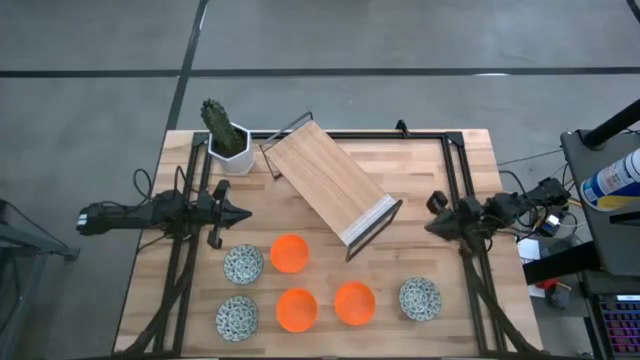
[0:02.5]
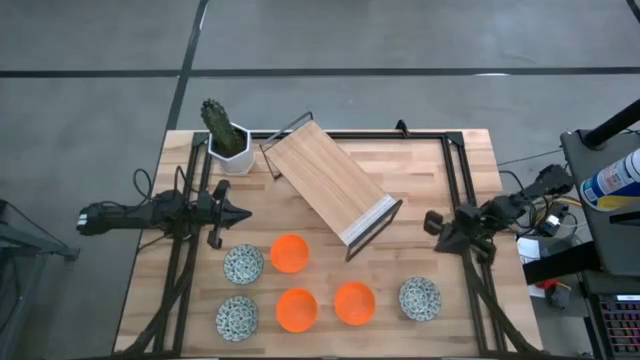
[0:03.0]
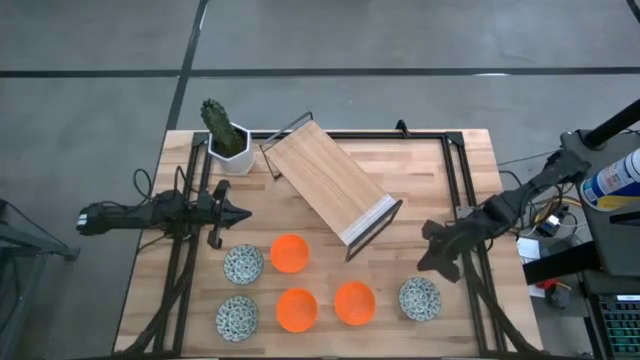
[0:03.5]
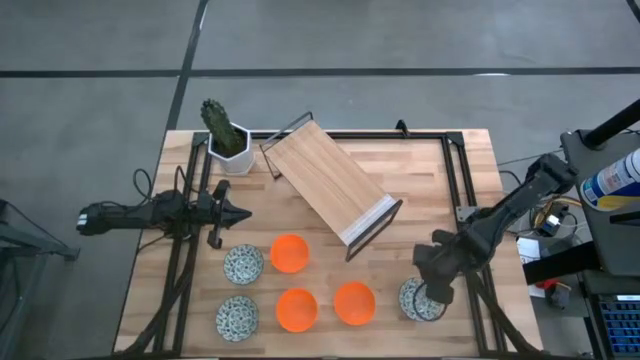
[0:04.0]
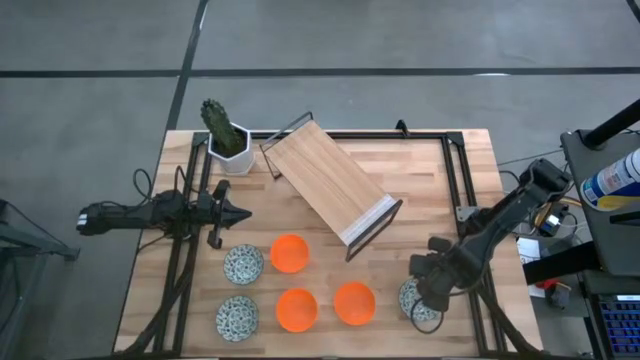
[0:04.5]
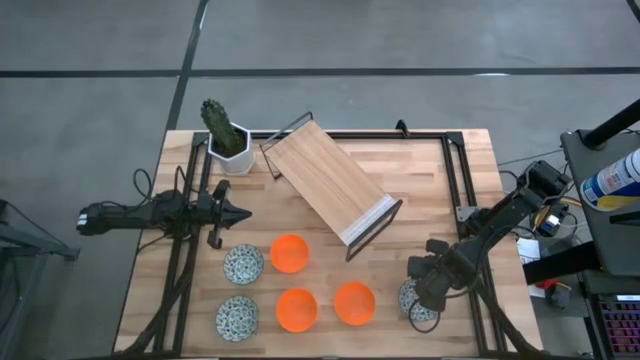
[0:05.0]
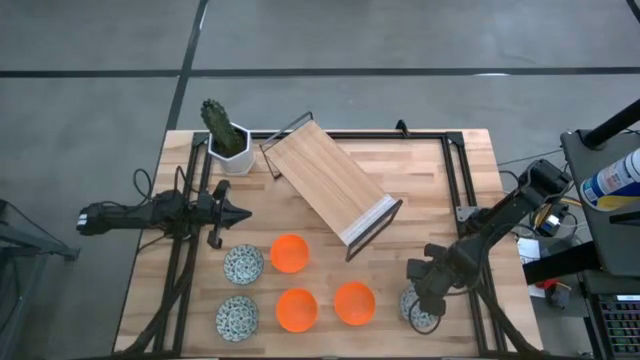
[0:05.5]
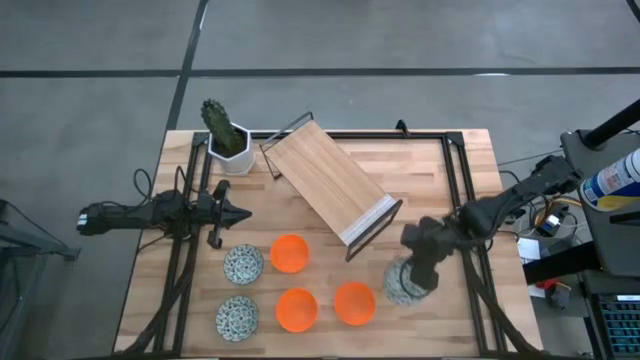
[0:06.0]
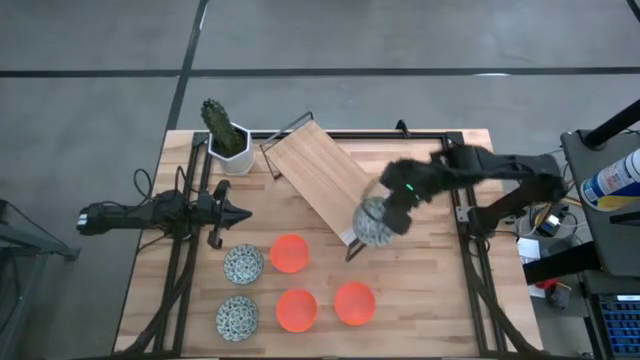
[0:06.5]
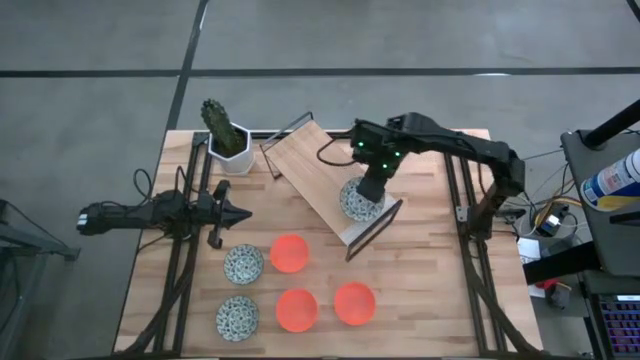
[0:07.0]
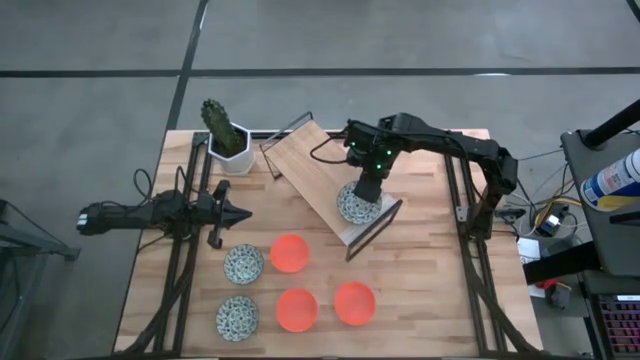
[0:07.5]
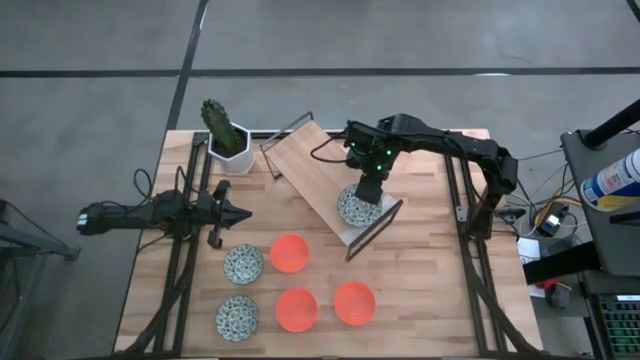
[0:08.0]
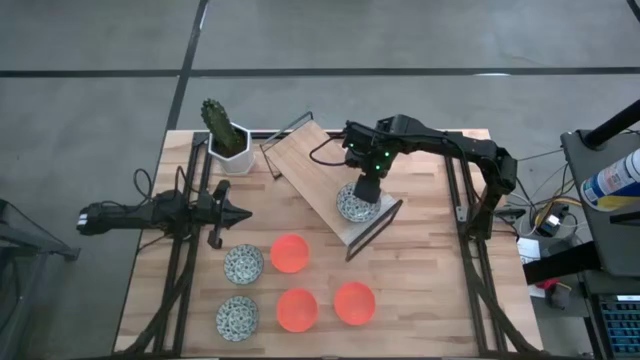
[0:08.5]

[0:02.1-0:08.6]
Task: Pick & Place Mini bowls
Put the bottom right white patterned bowl on the shelf

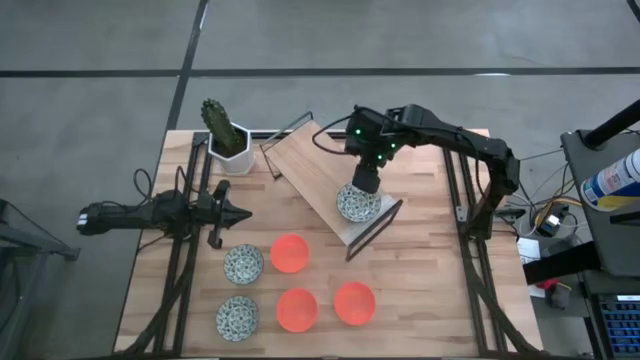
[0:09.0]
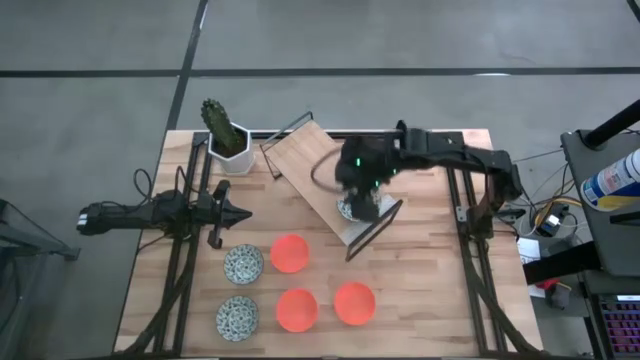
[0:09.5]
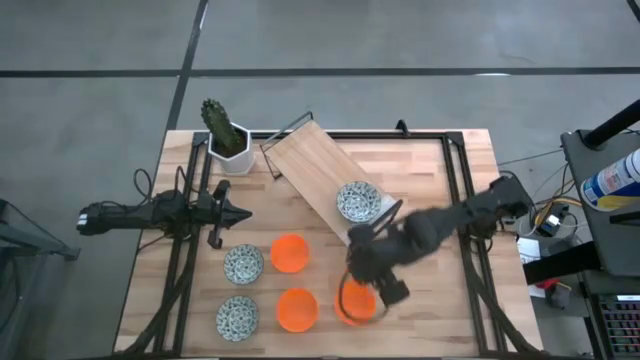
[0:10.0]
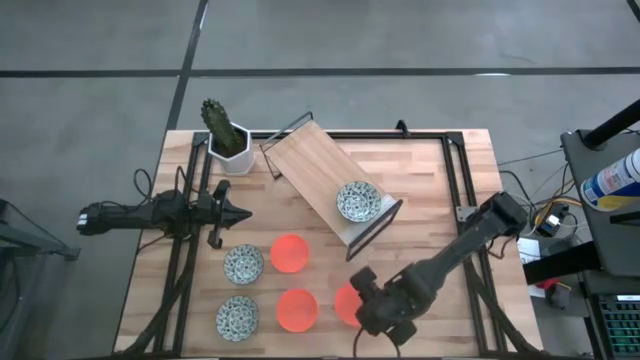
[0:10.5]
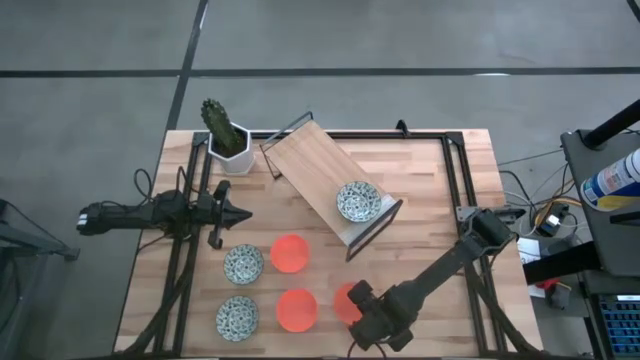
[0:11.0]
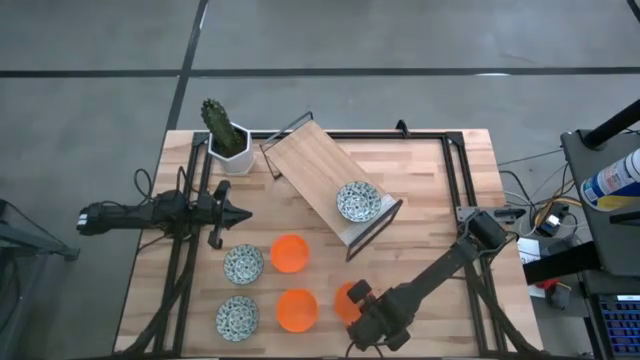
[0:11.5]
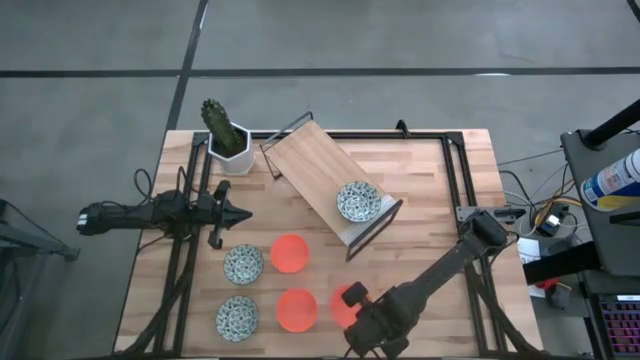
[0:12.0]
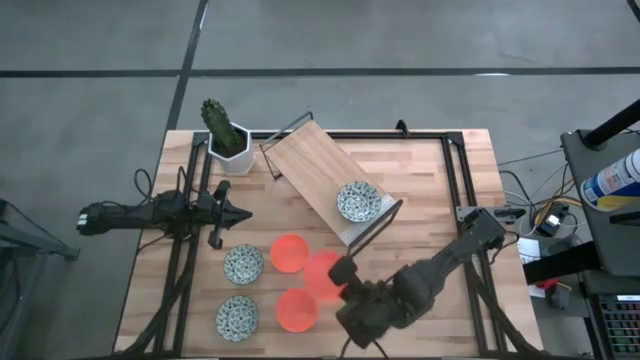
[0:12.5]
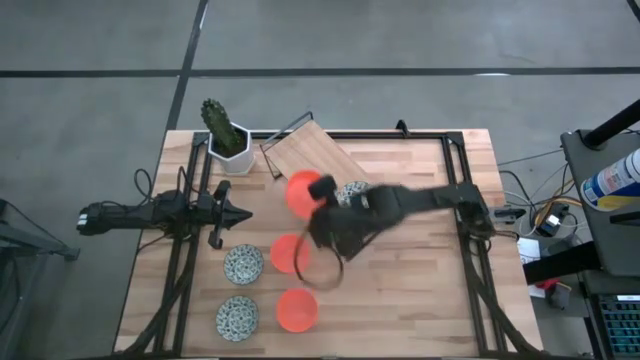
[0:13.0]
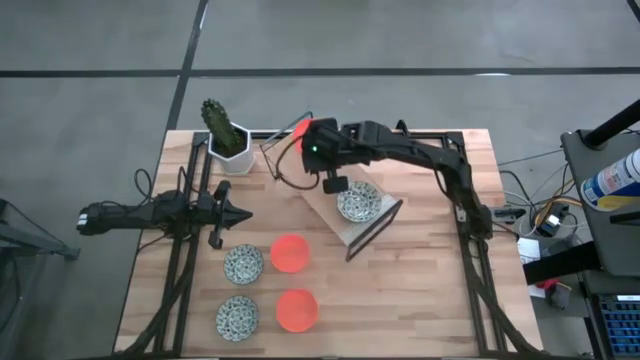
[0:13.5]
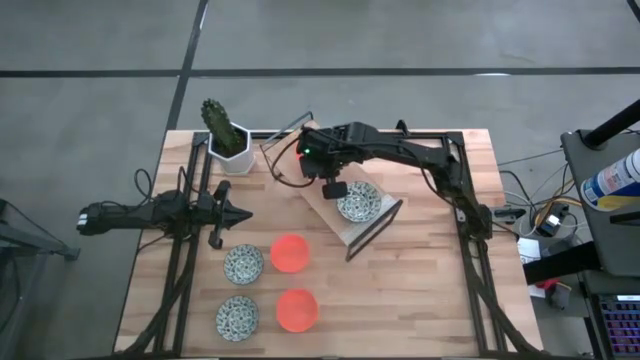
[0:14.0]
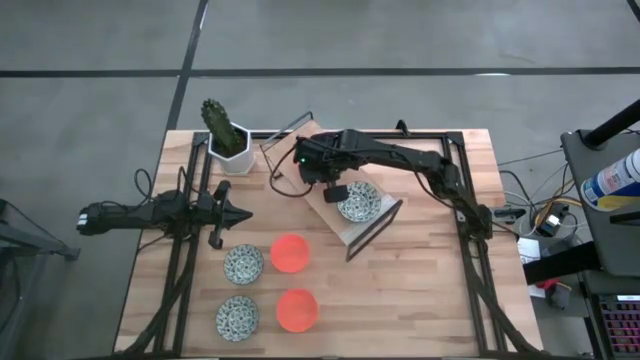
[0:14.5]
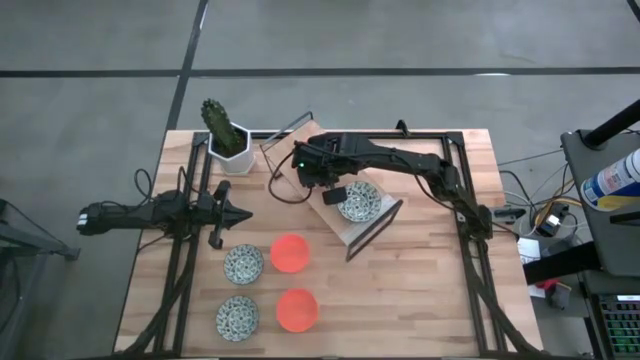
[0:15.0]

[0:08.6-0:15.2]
Put the bottom right orange bowl on the shelf

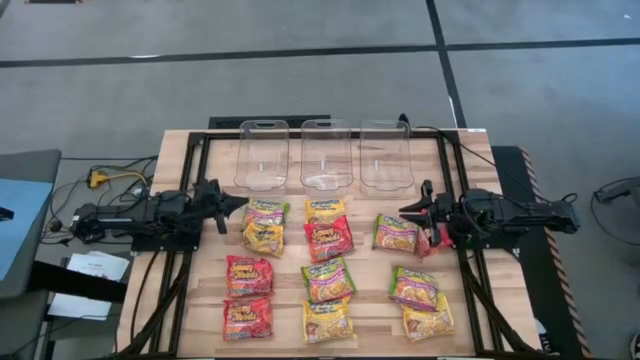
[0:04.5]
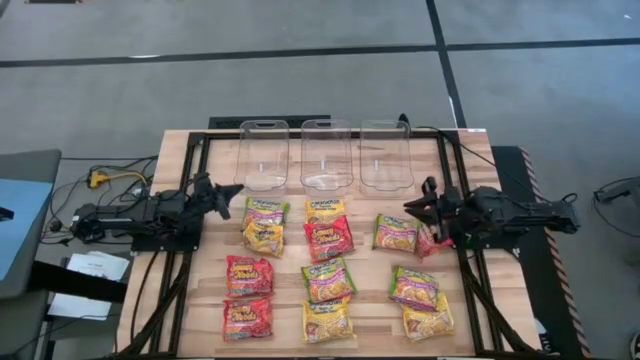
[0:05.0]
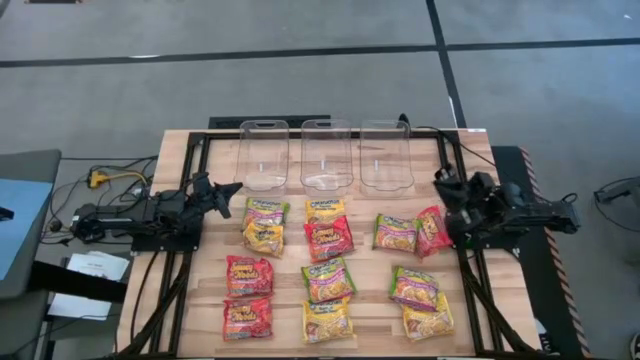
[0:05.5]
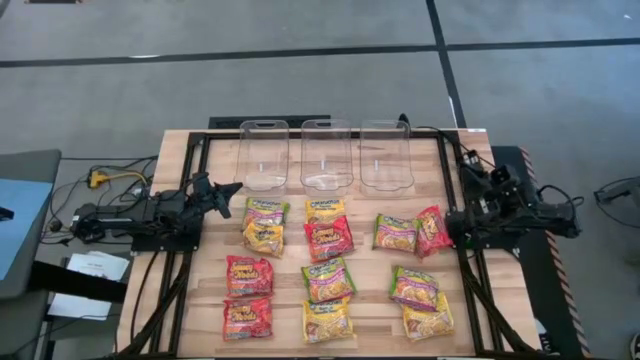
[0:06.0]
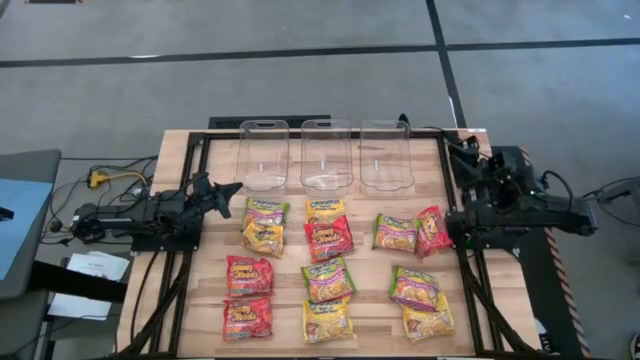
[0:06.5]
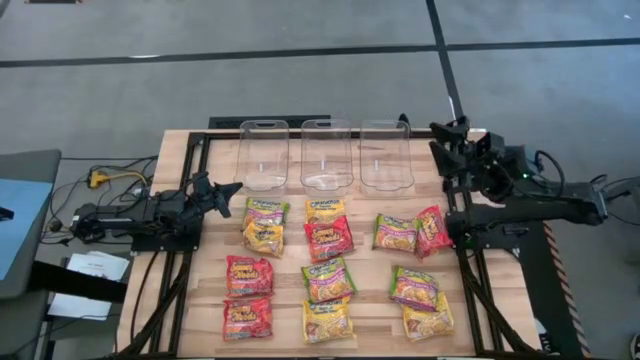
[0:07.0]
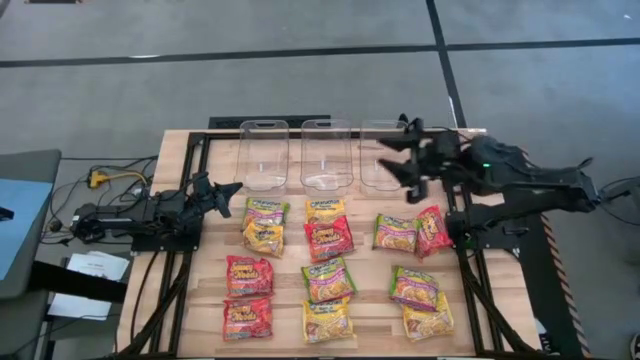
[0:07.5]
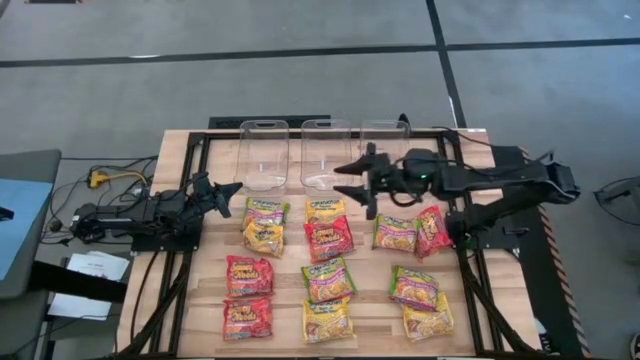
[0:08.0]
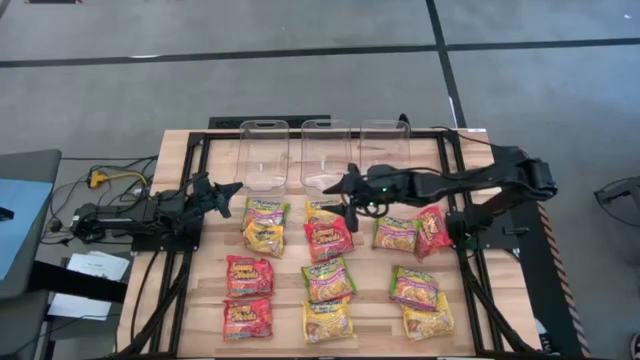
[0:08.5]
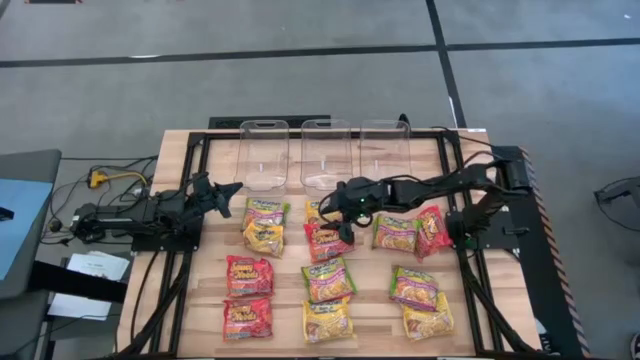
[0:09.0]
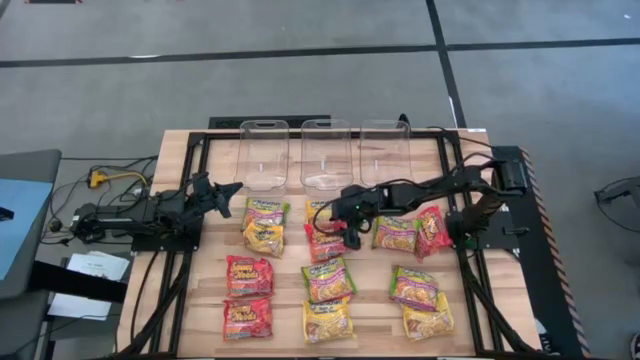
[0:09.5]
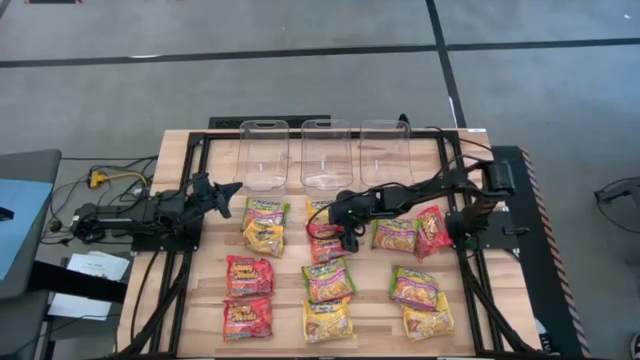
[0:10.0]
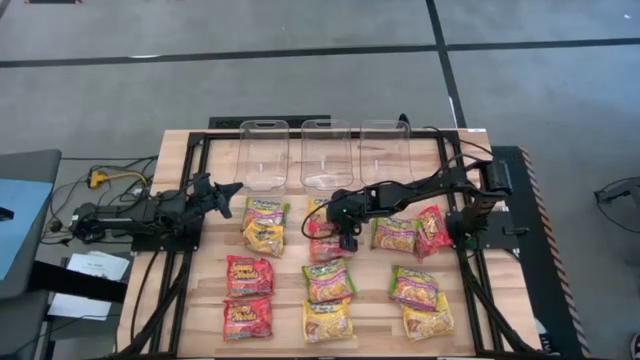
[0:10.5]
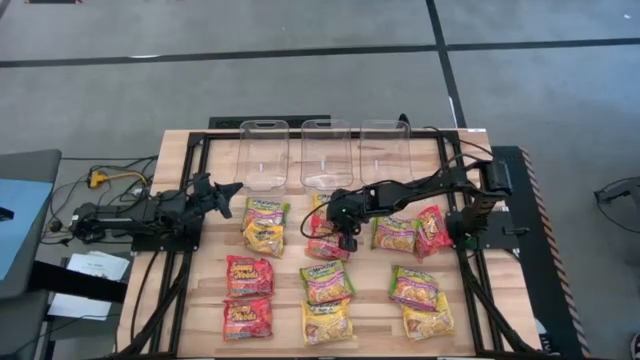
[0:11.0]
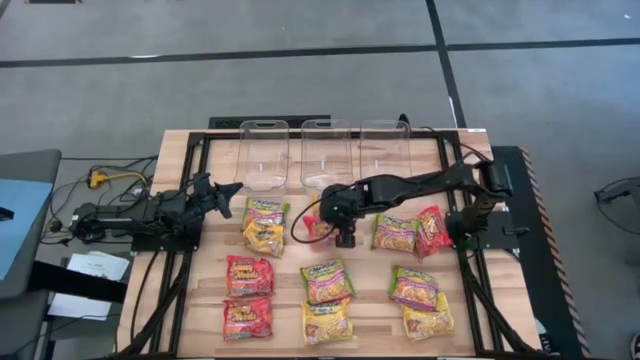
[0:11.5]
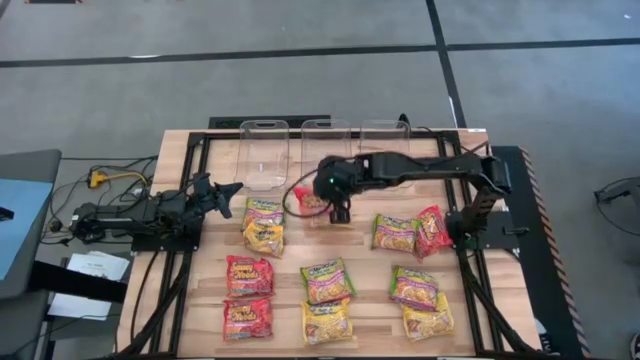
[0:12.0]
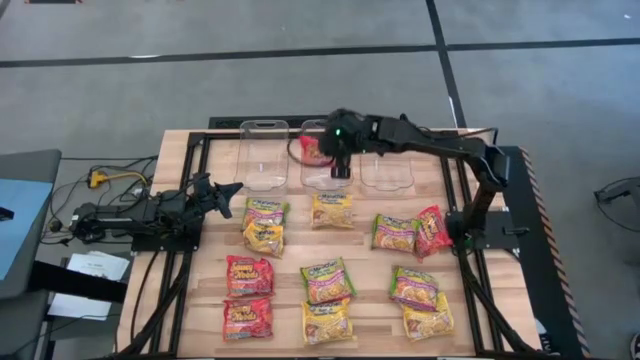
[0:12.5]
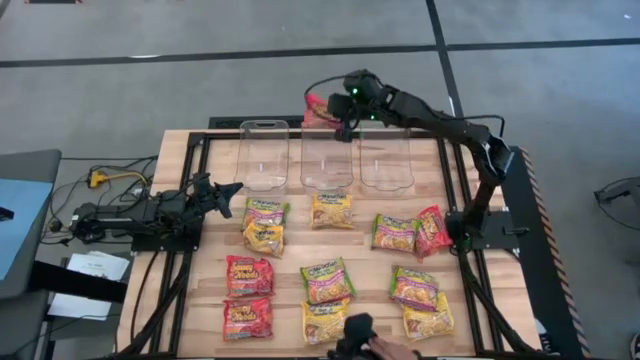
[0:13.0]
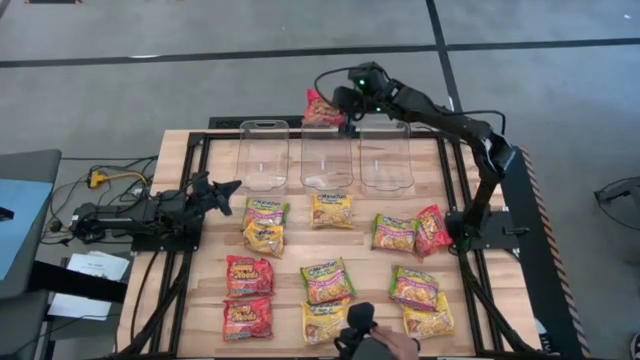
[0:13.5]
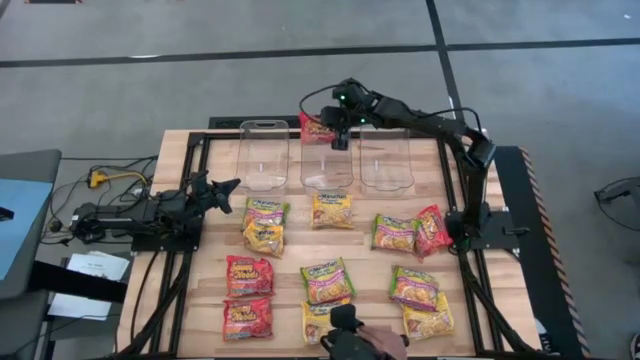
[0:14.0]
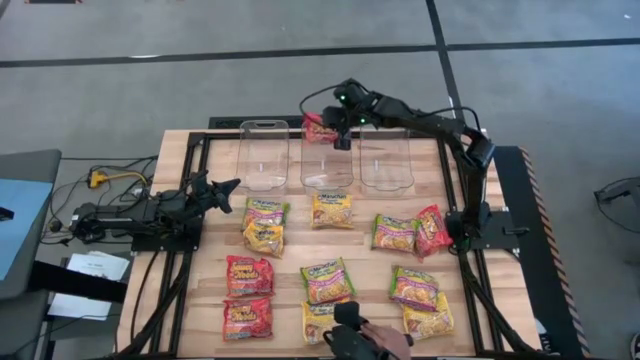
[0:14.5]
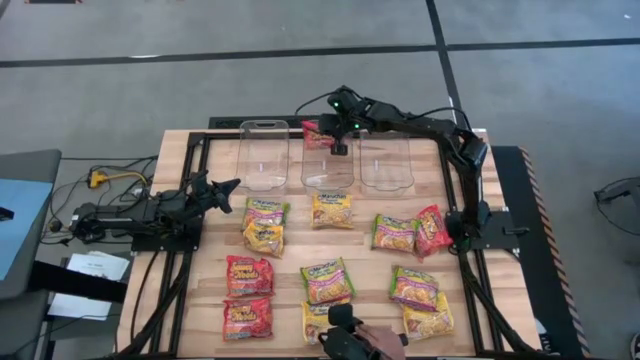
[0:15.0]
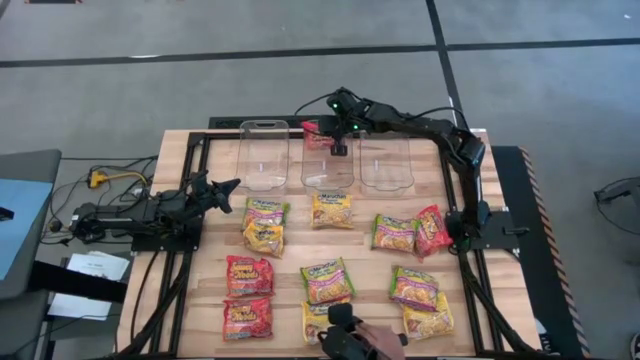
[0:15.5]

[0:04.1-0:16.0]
Task: Sort Maruchan noodles
Put the orange noodle pack into the middle transparent bin
